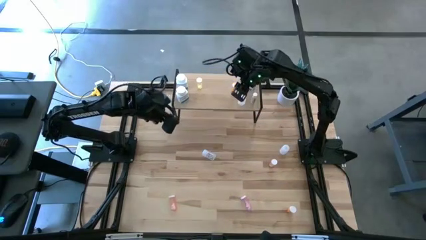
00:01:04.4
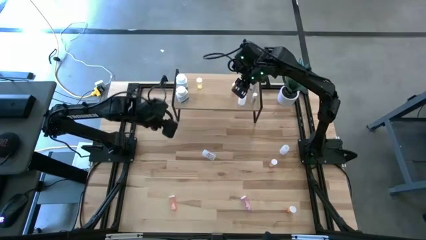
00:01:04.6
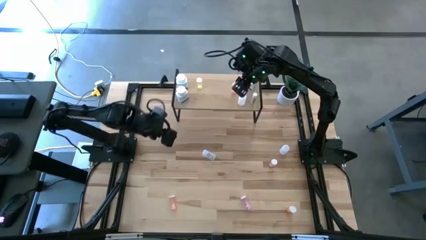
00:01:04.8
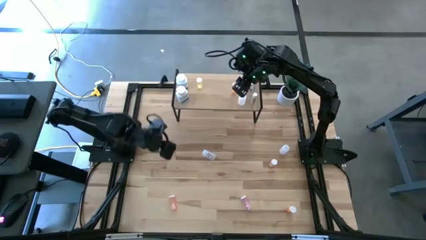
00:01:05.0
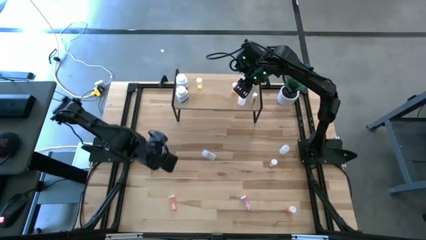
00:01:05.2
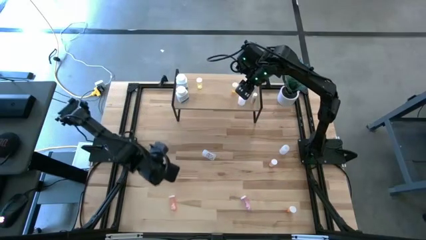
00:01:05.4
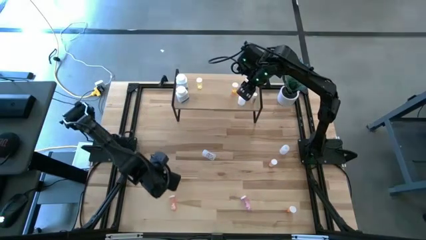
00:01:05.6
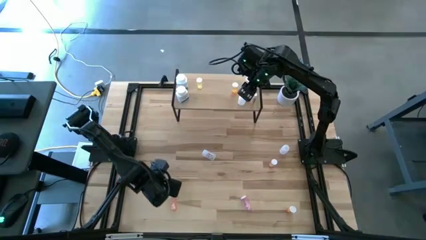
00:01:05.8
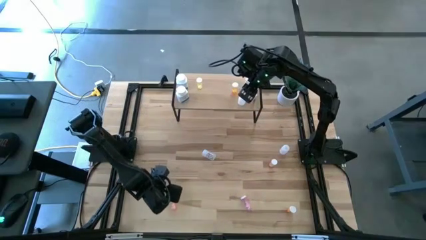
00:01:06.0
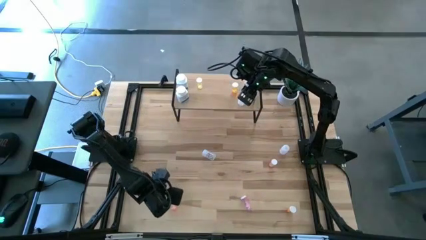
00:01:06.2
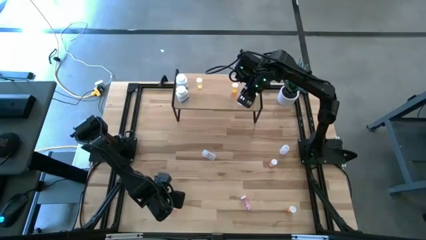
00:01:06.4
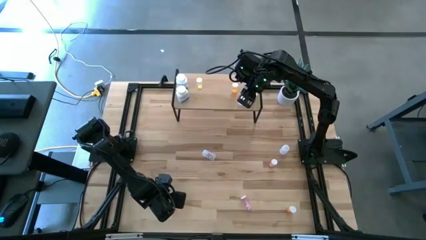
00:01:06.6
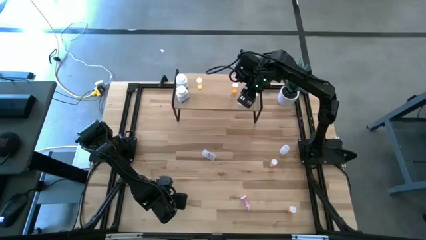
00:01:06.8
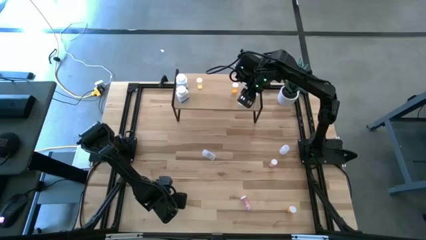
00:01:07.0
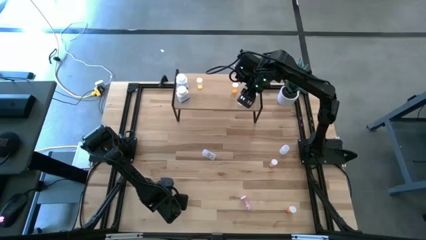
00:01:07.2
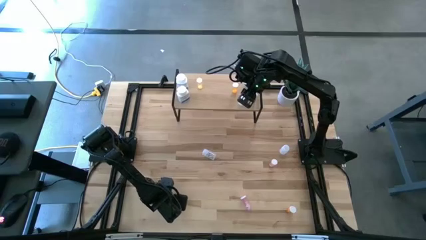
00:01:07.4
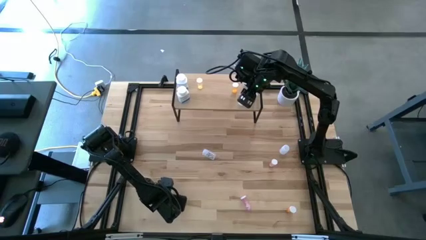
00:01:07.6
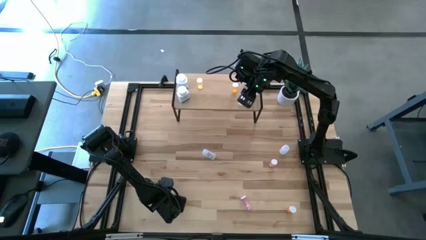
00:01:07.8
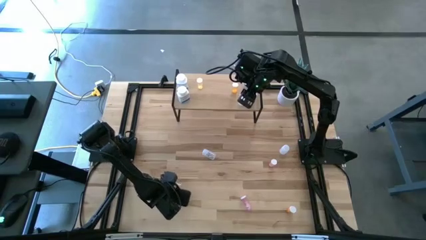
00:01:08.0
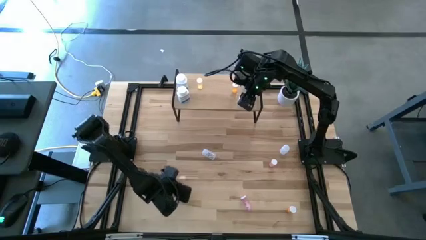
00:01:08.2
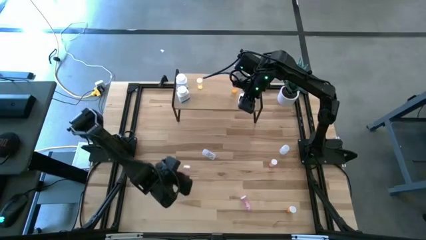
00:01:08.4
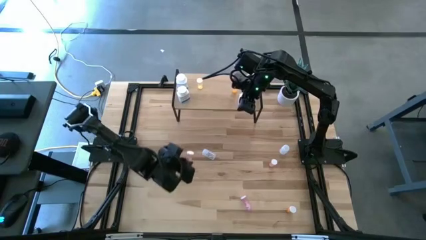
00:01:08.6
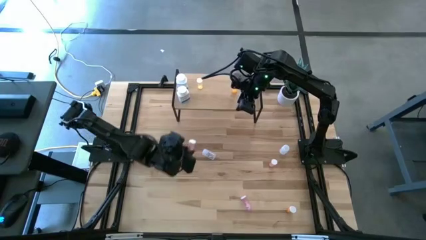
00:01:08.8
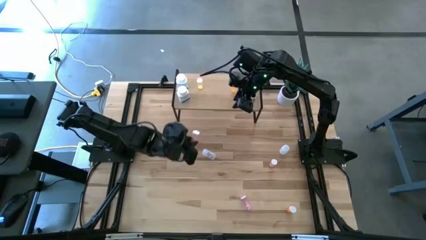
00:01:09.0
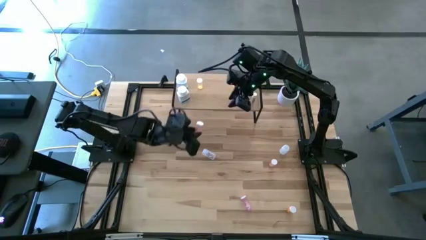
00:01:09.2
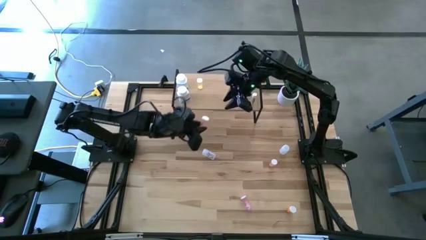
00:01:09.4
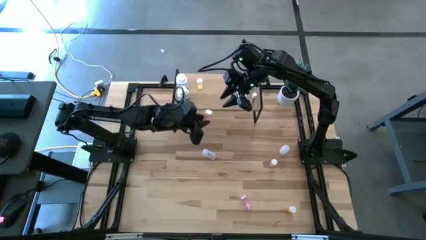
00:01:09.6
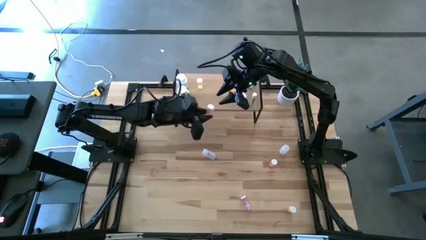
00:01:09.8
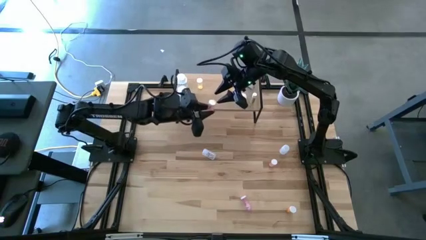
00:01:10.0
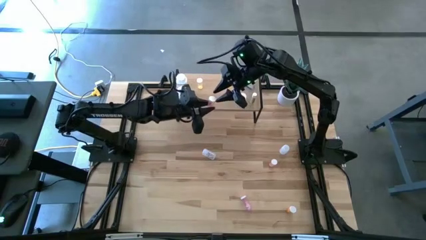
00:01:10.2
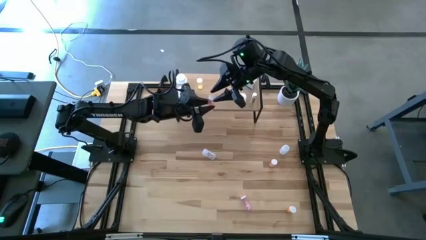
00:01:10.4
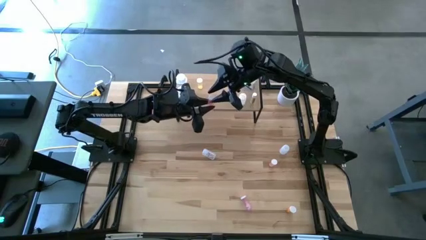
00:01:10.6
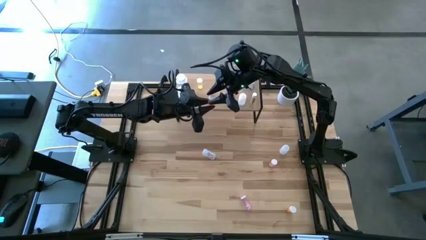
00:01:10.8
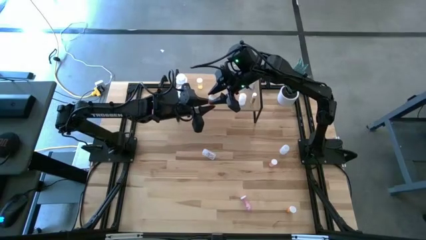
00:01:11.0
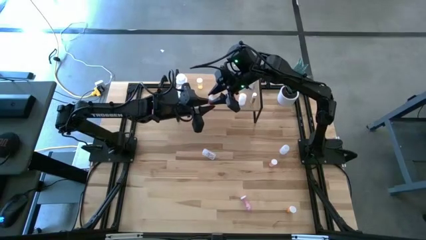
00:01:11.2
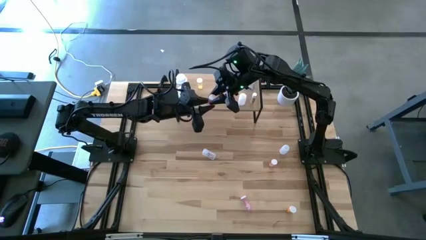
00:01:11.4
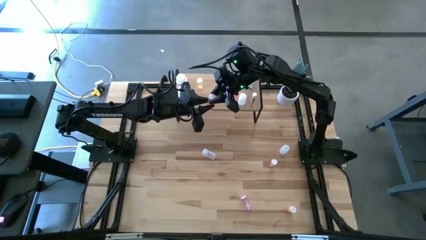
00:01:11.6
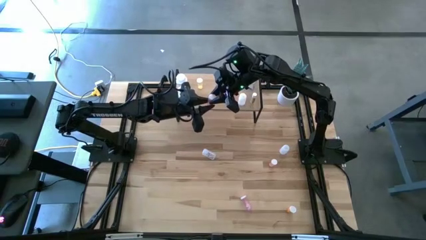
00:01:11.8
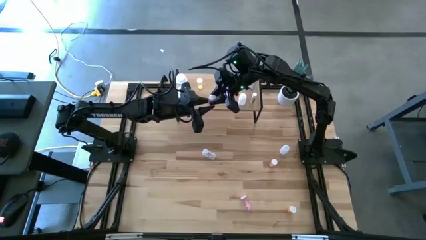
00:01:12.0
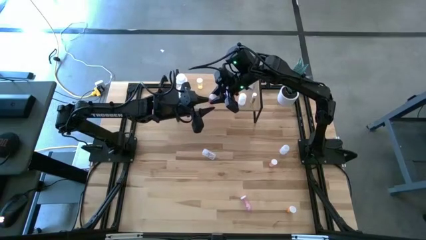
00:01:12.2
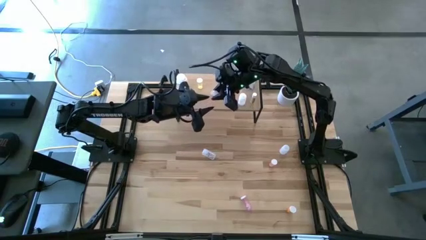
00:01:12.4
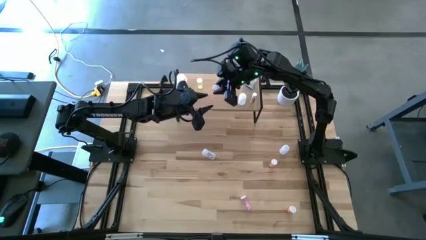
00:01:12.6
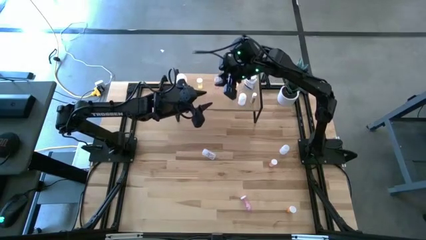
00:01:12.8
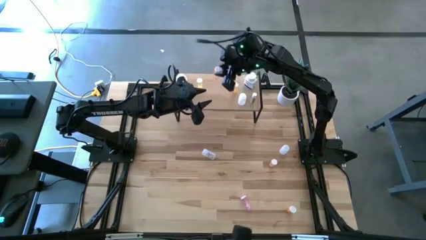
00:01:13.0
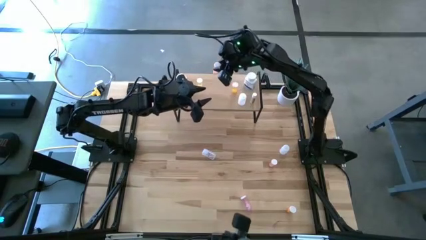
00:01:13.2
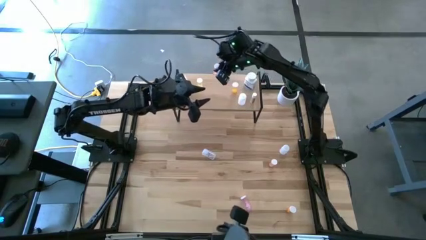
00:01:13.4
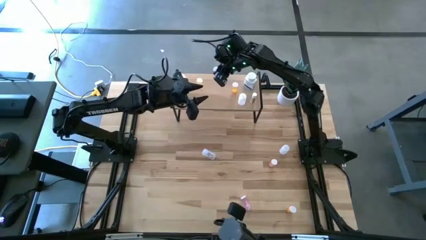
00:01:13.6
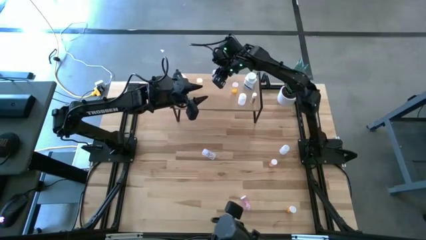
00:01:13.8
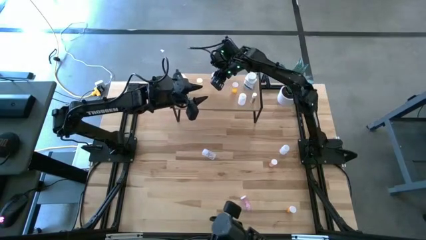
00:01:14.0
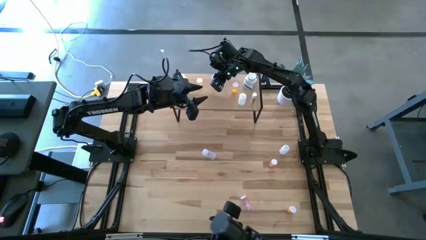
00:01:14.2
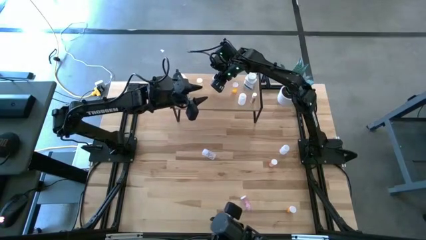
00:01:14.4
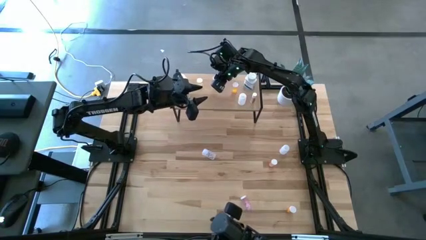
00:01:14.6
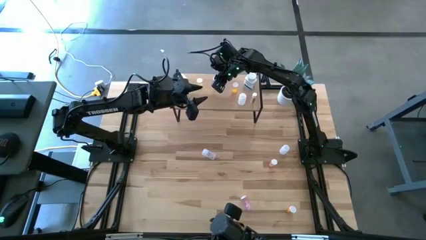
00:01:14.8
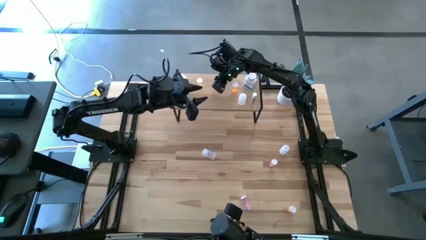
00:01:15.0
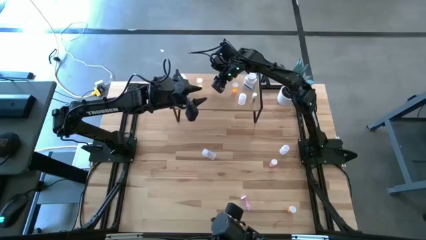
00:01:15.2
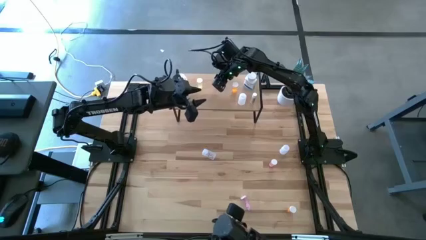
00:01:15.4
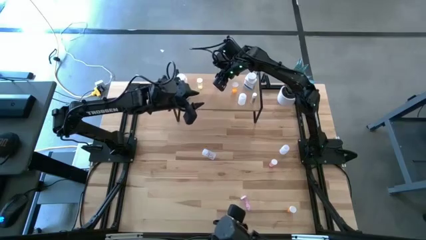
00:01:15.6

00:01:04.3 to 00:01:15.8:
Task: Pick and place medicine bottles onto shelf by color
Put the bottom pink pill bottle on the shelf

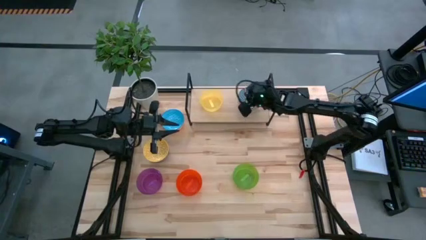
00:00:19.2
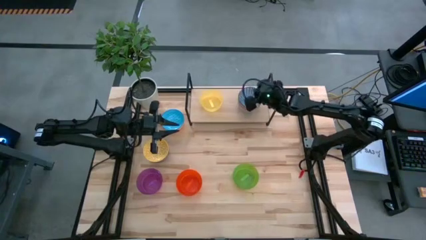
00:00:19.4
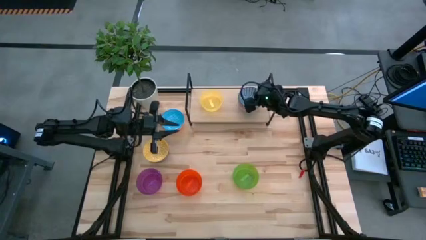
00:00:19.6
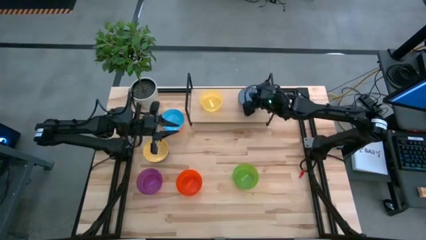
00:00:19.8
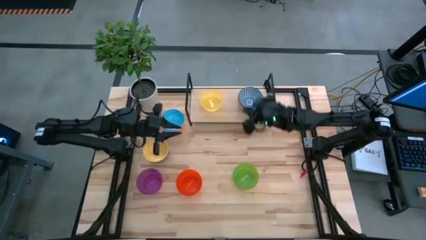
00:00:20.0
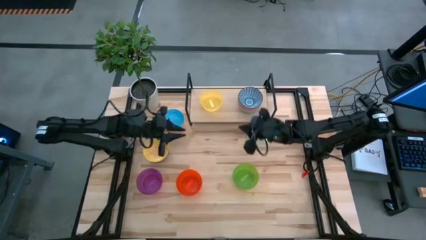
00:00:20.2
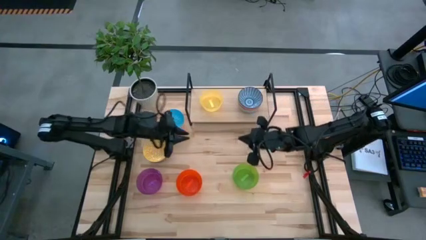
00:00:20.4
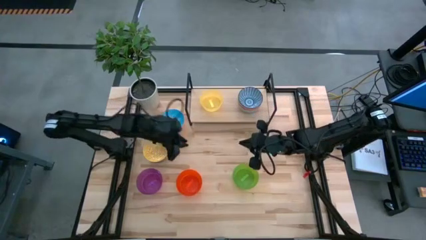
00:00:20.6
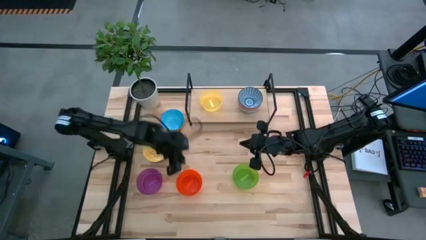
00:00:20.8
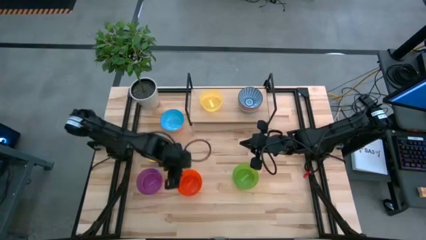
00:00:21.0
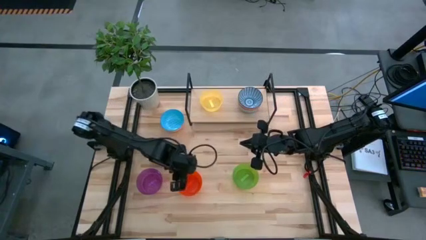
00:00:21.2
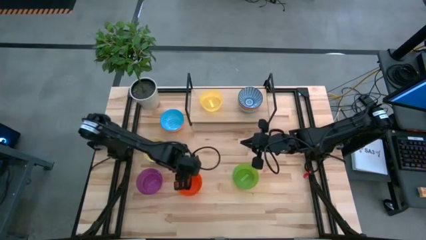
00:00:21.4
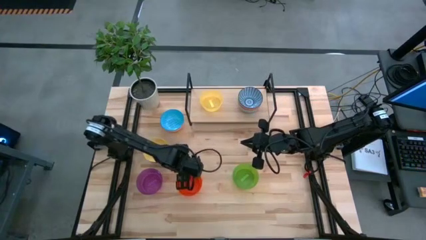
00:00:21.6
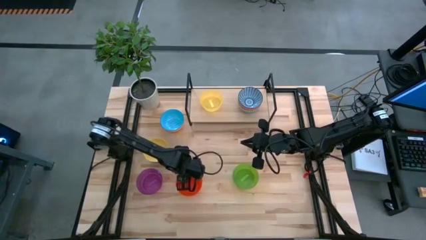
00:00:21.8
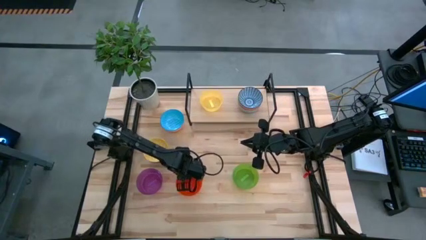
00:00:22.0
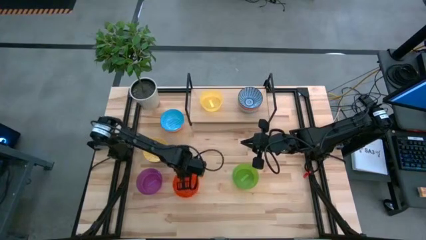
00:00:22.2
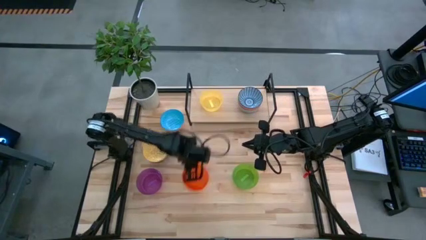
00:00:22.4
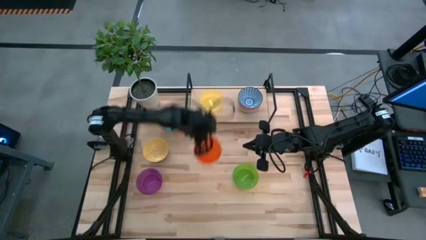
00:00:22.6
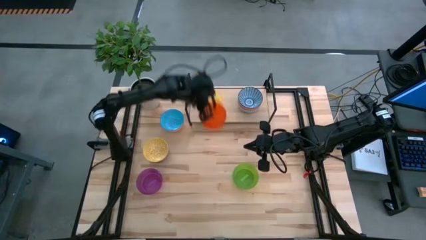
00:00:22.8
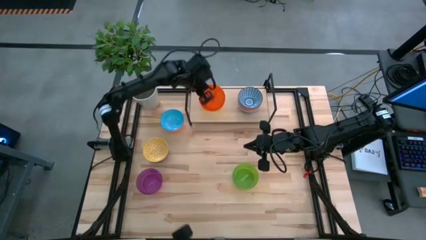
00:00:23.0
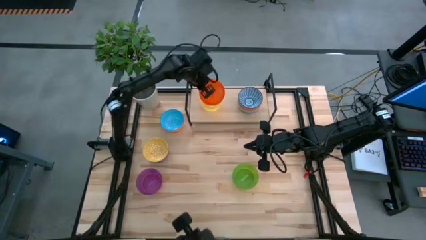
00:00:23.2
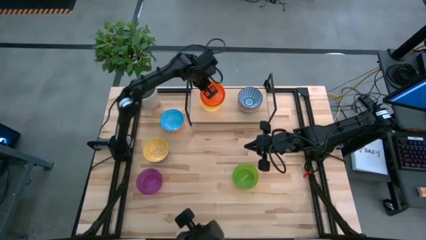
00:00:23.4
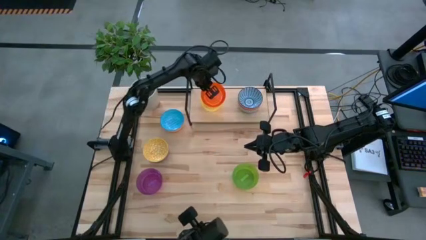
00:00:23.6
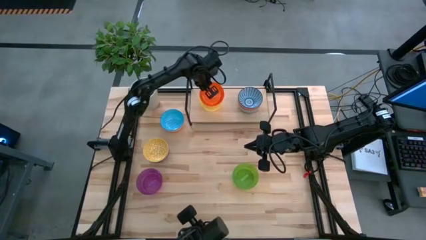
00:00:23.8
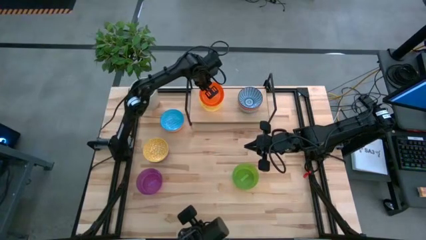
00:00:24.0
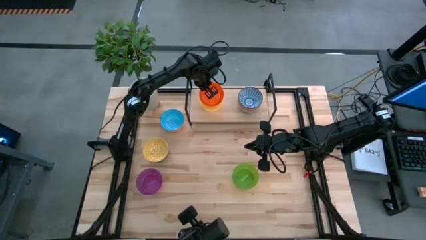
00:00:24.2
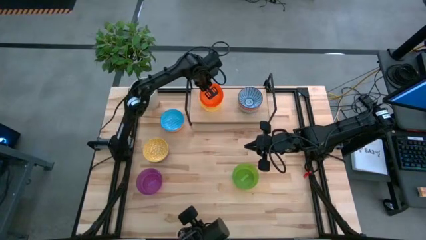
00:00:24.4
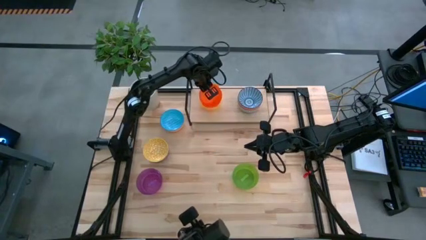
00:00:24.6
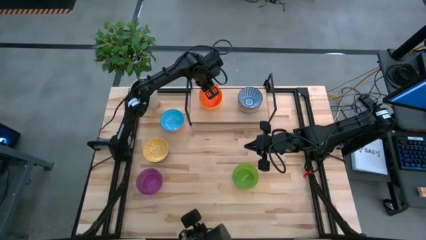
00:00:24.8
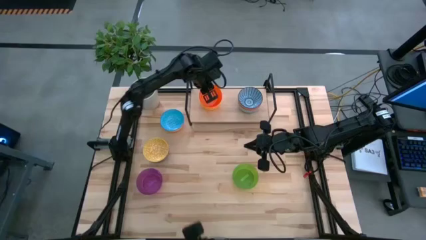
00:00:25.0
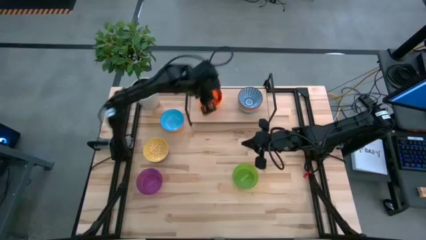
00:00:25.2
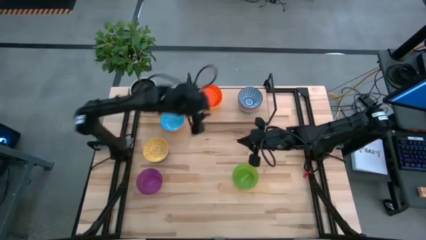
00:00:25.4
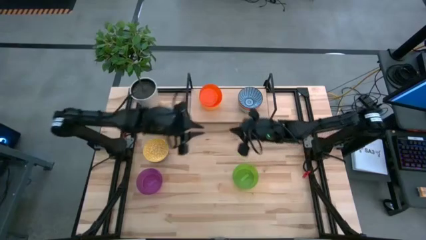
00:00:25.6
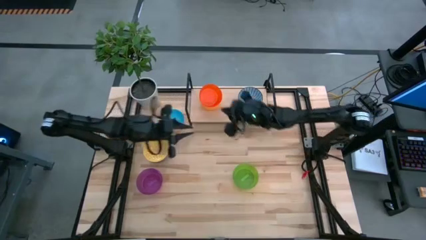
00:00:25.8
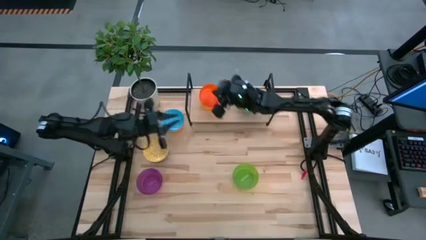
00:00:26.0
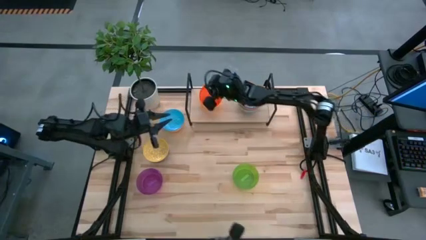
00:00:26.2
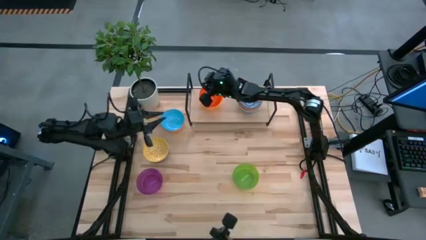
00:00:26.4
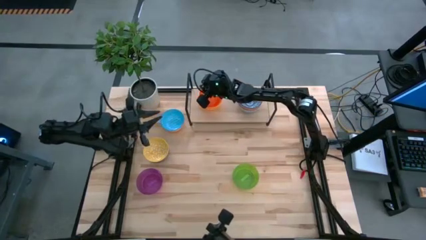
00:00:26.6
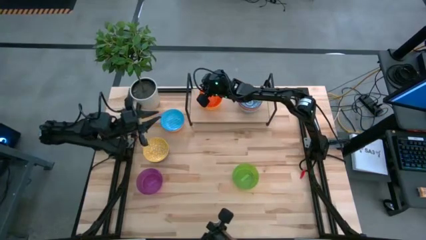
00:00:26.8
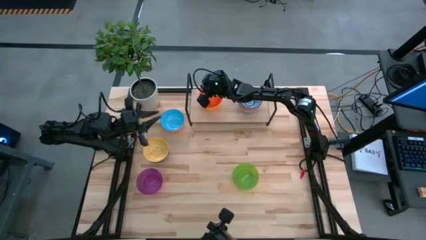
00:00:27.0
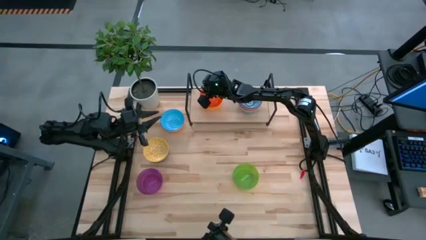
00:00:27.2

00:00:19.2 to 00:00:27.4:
Task: Place and stack bowls onto a shelf
Stack the orange bowl on top of the yellow bowl on the shelf
